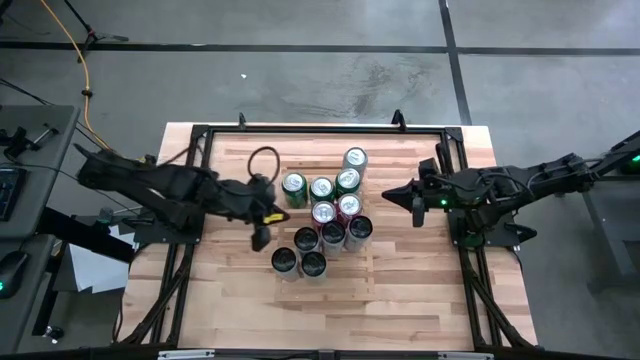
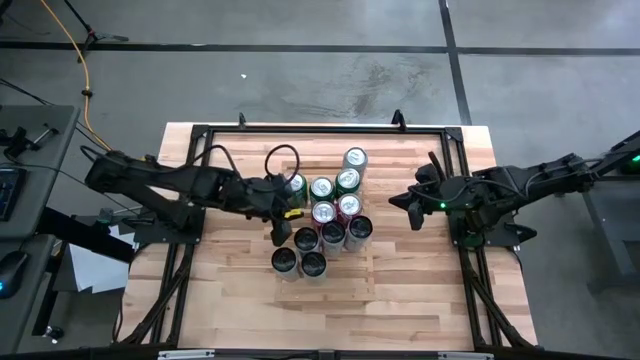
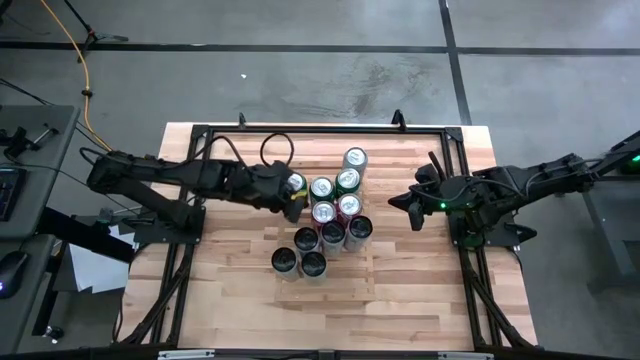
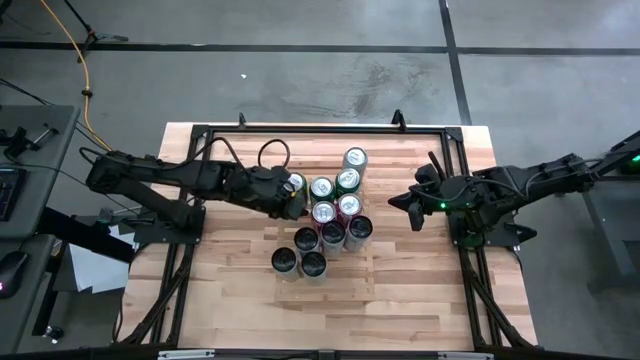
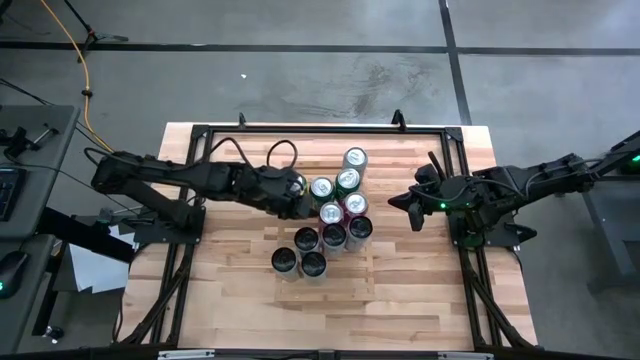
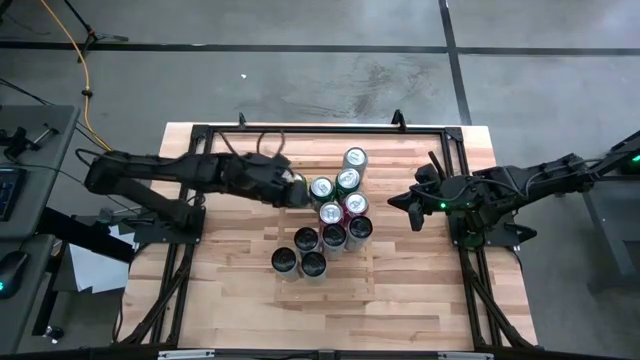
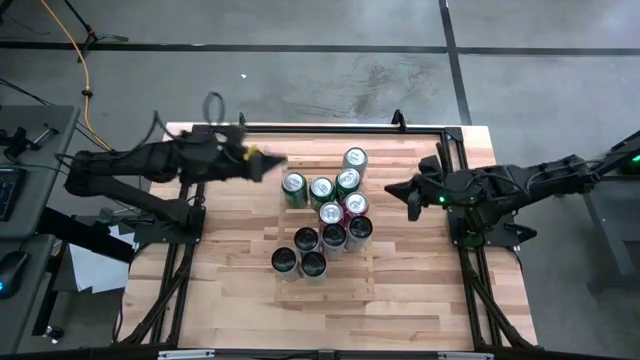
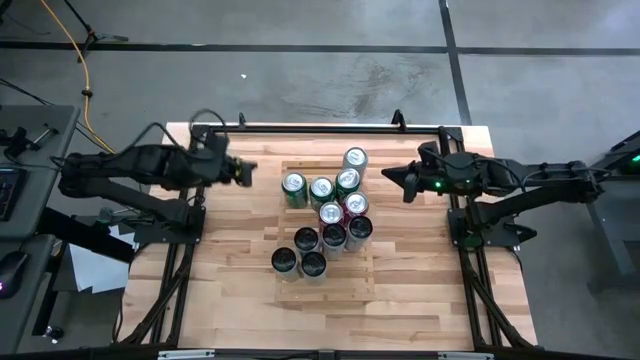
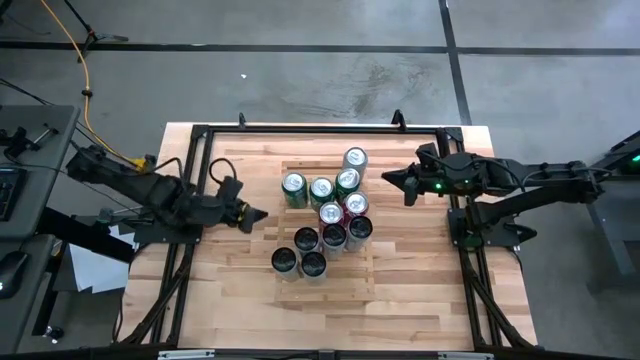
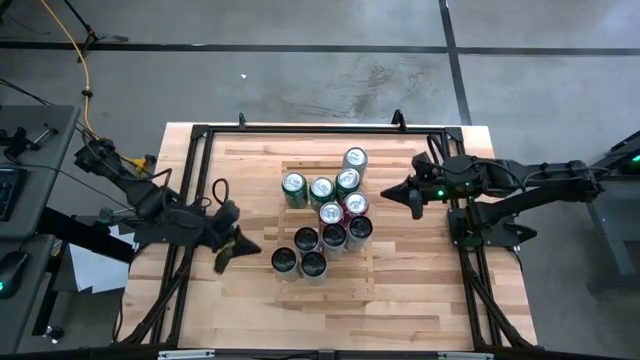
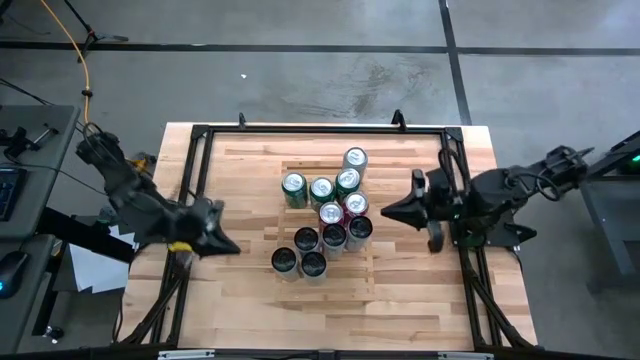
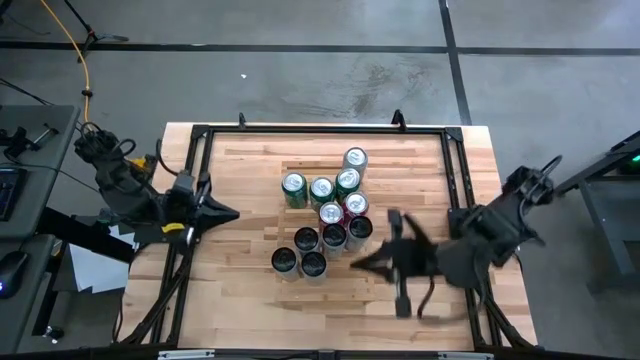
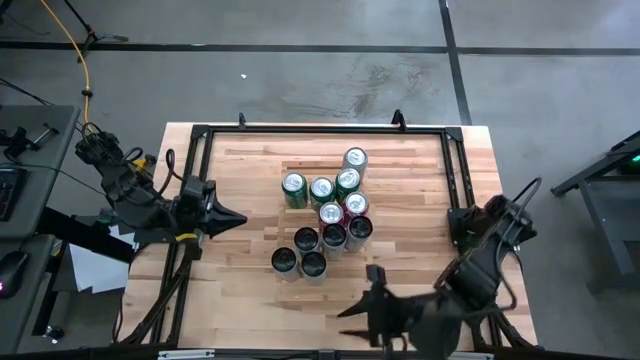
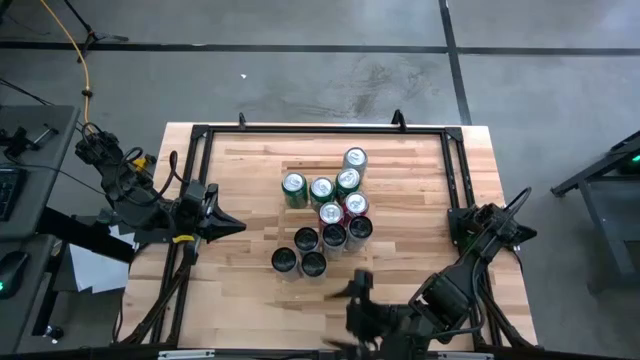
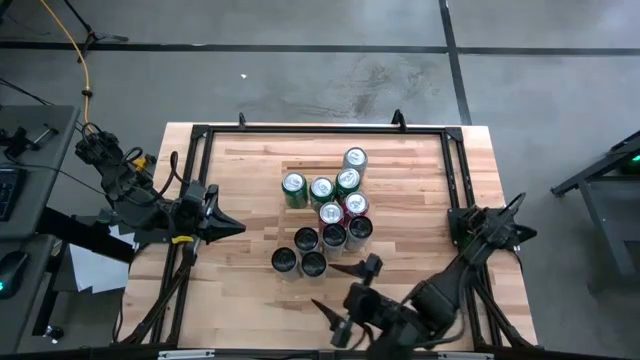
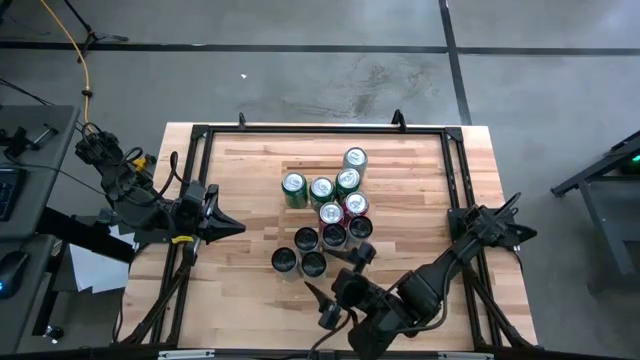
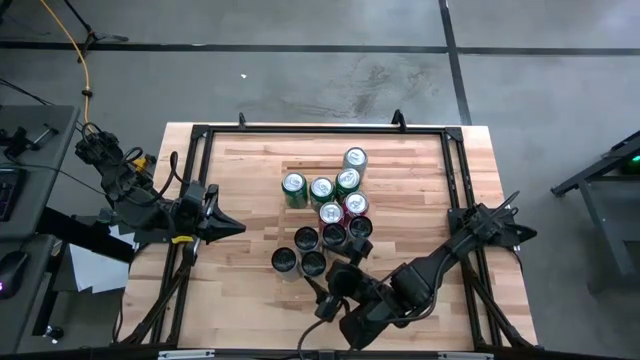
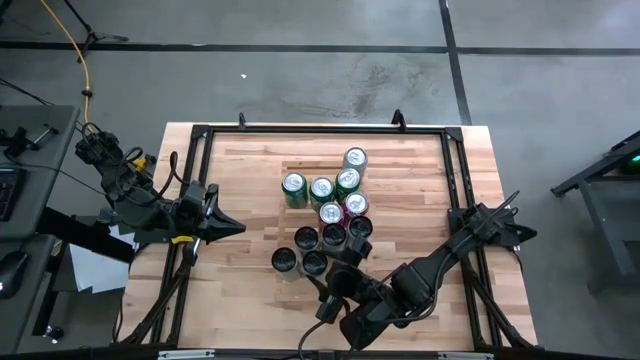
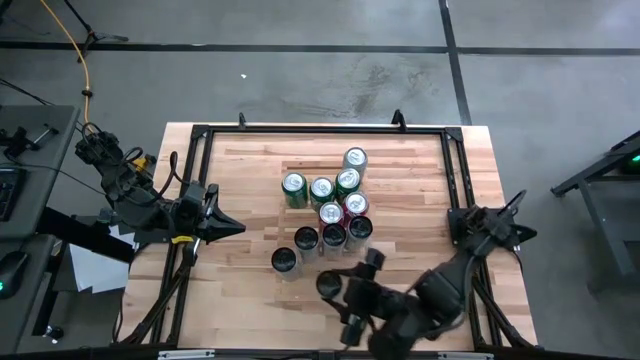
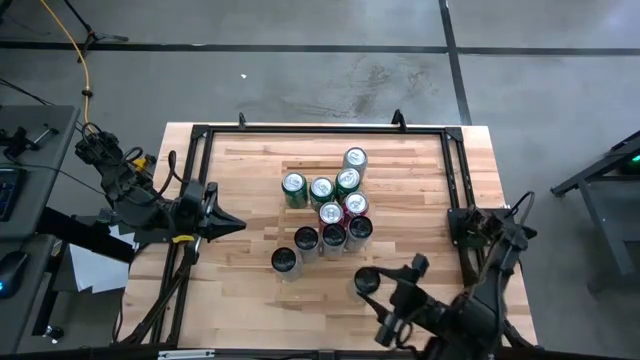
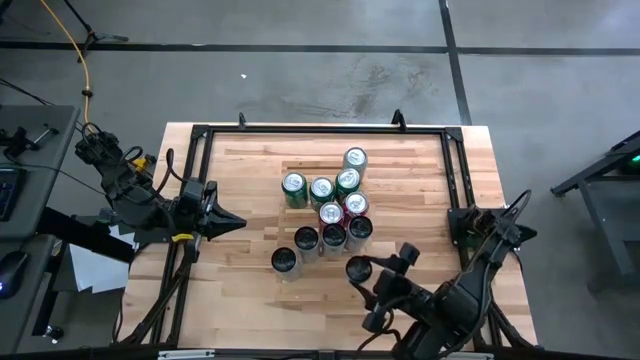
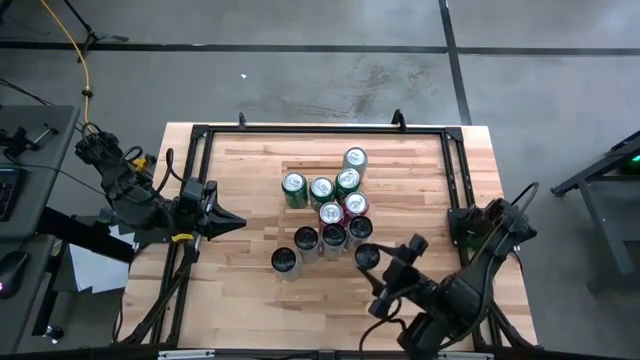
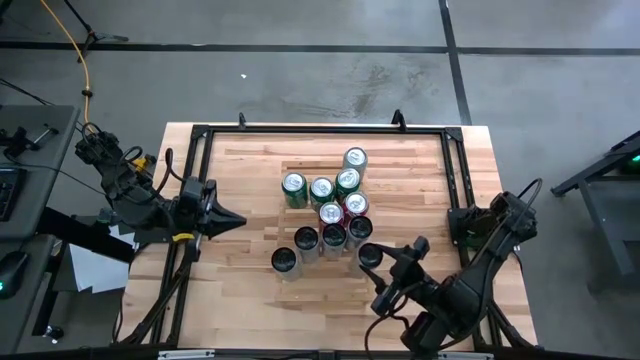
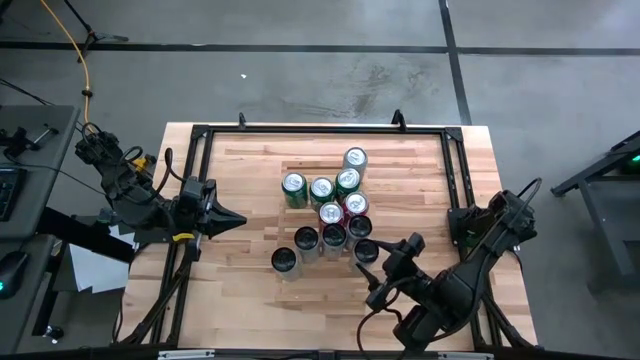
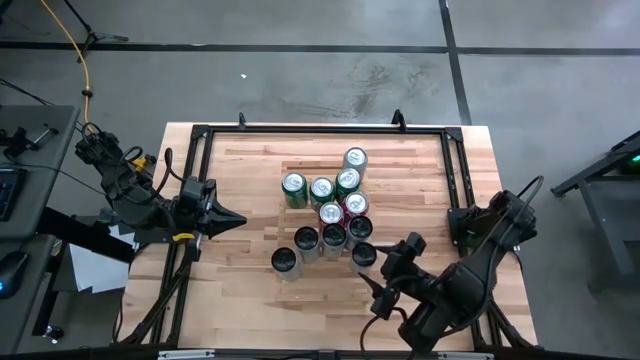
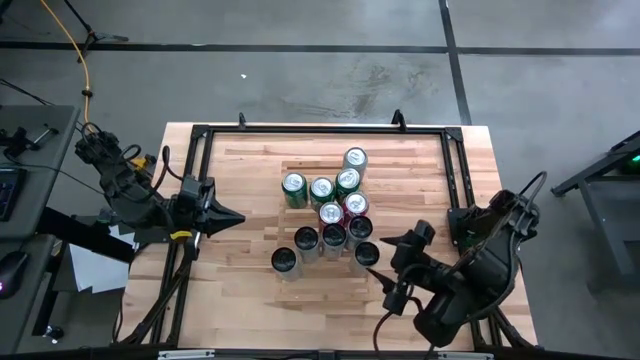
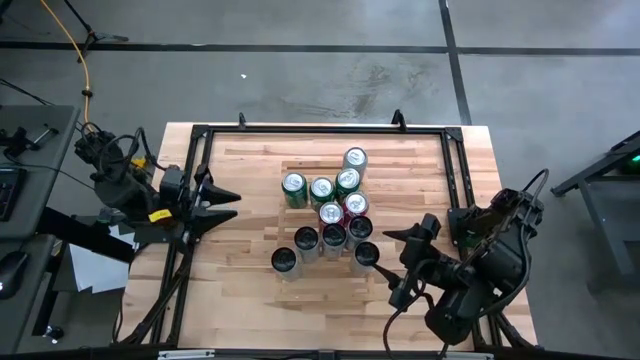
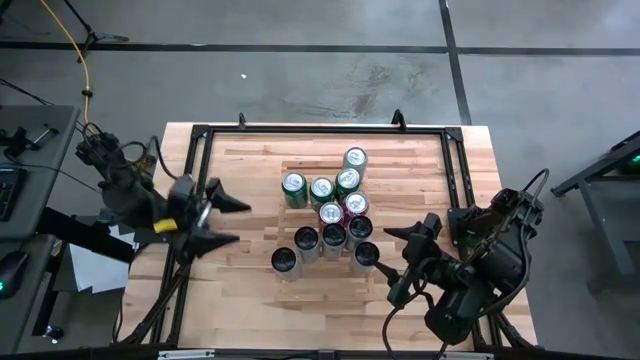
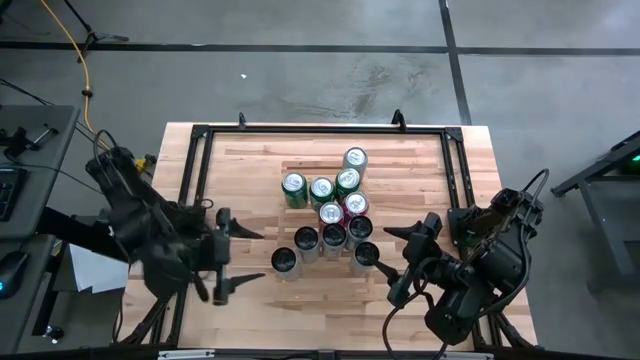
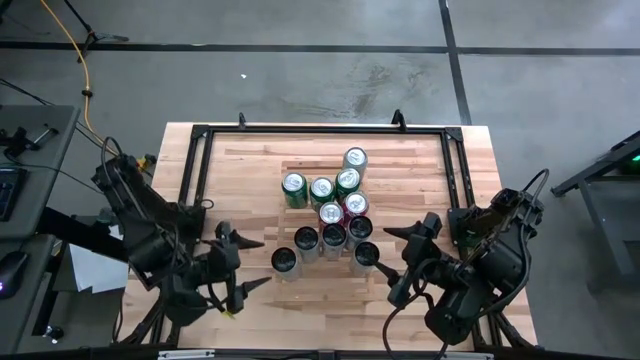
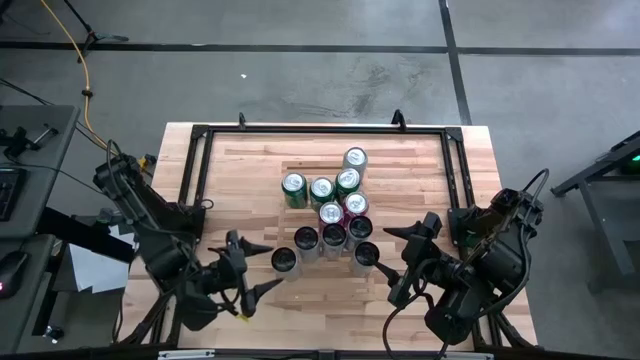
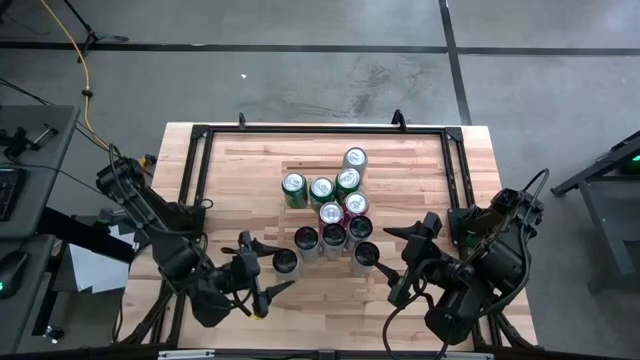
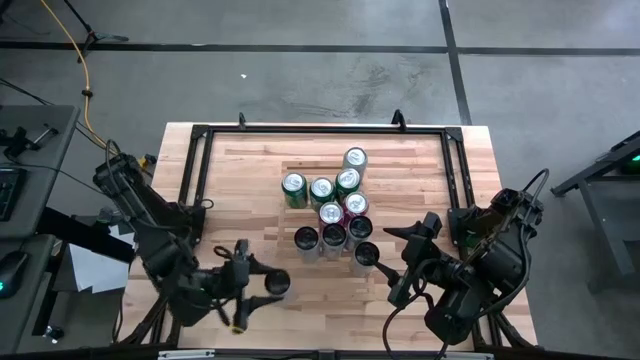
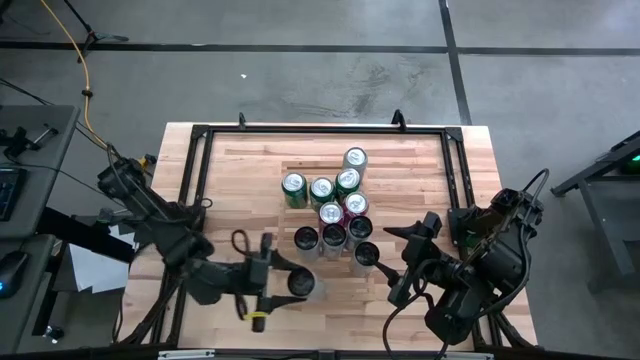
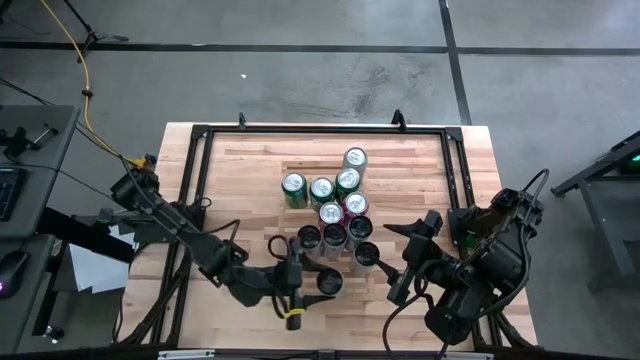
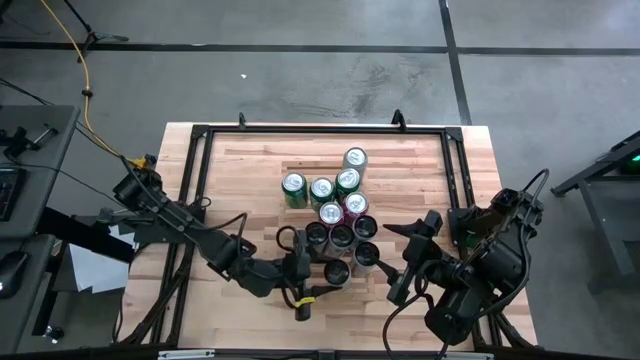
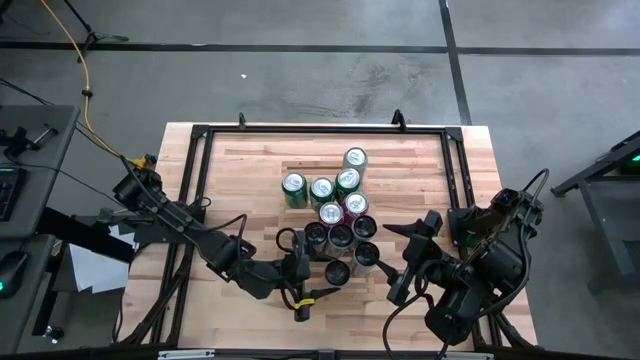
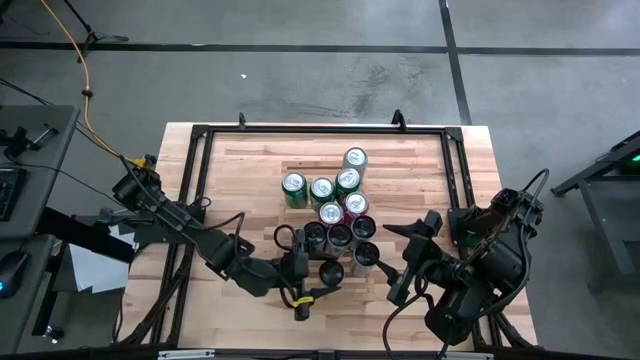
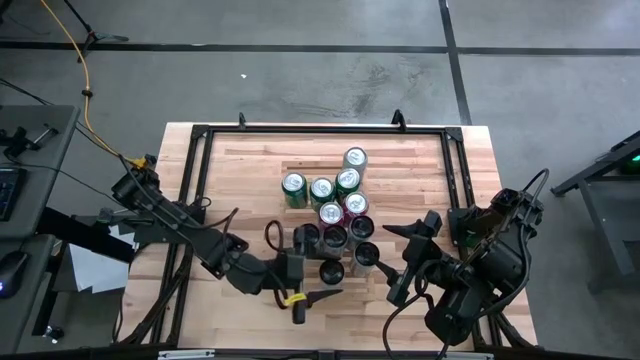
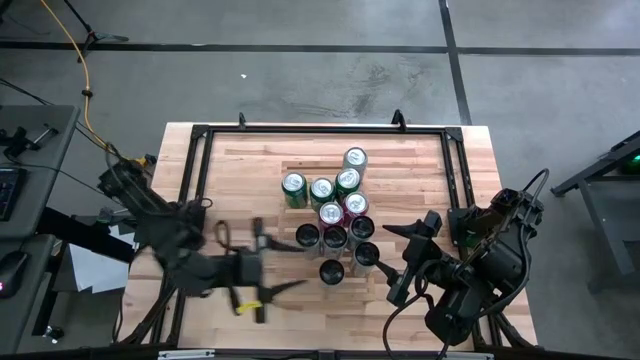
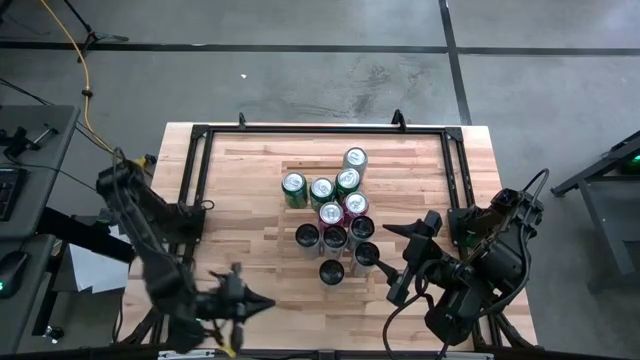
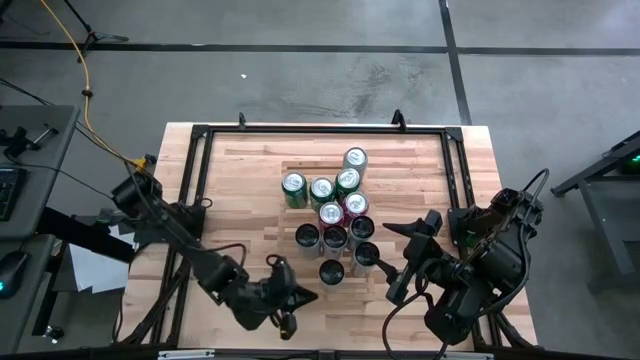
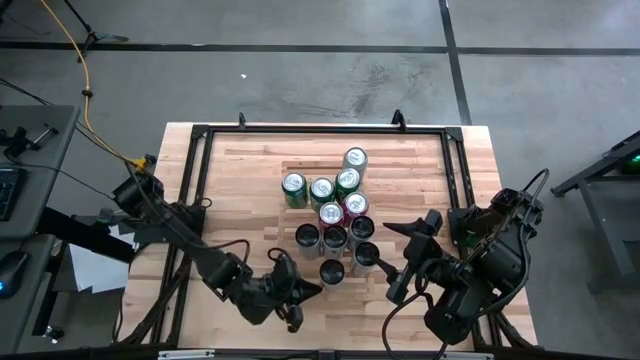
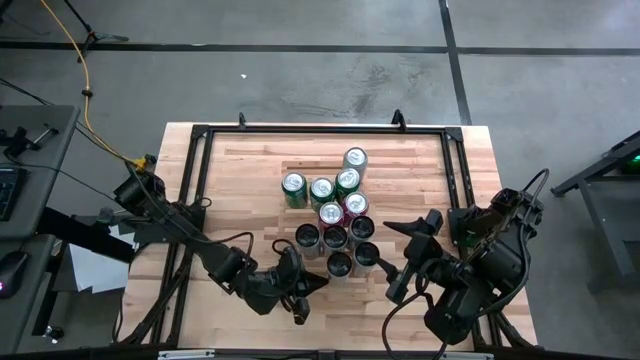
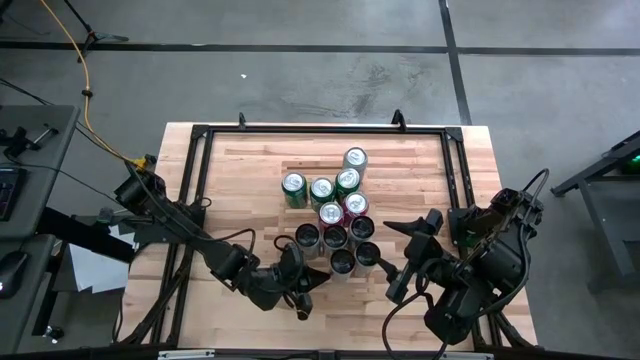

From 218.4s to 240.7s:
Task: Place canned beverage on shelf
Adjust the soda cans
